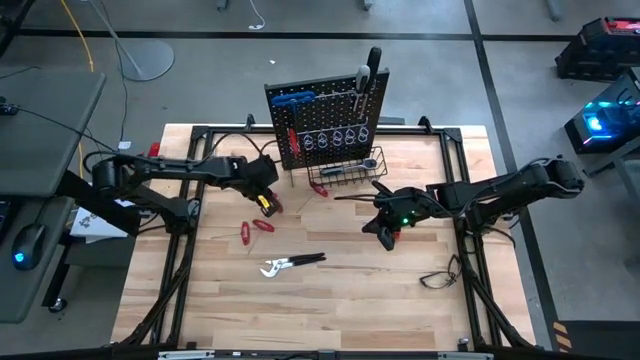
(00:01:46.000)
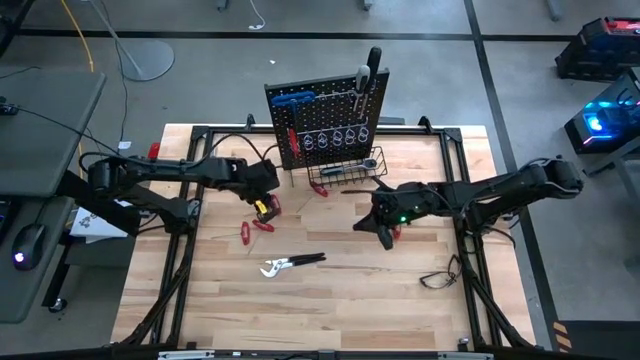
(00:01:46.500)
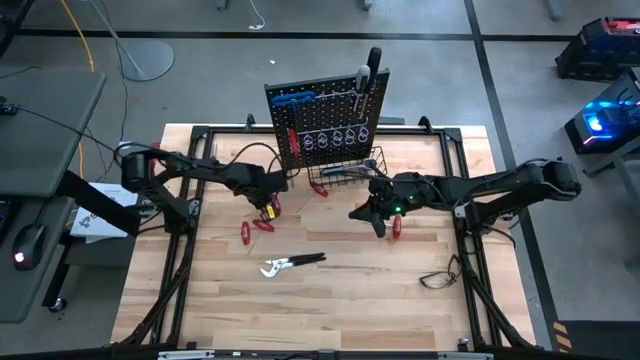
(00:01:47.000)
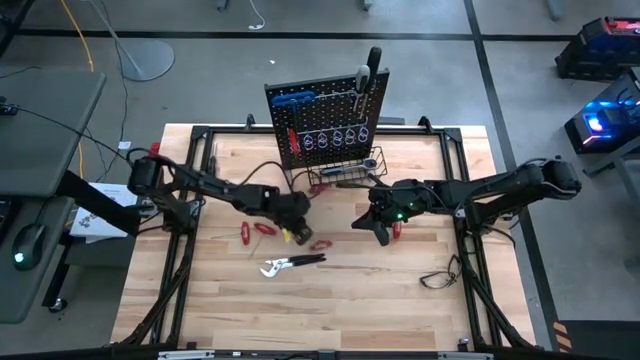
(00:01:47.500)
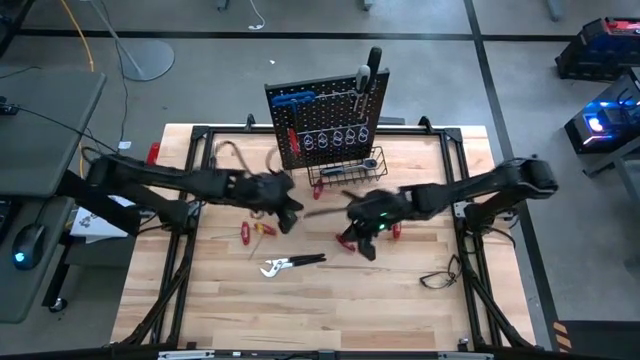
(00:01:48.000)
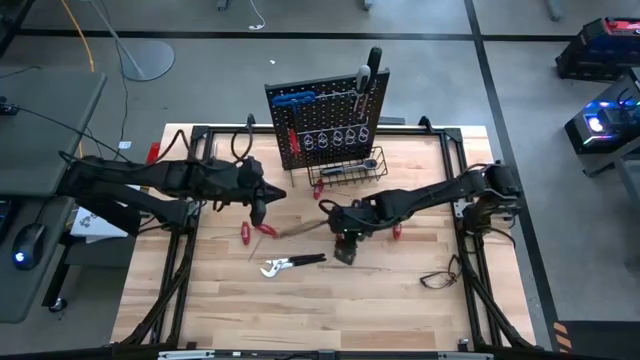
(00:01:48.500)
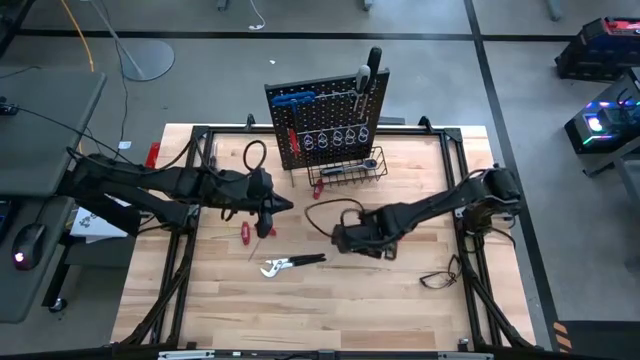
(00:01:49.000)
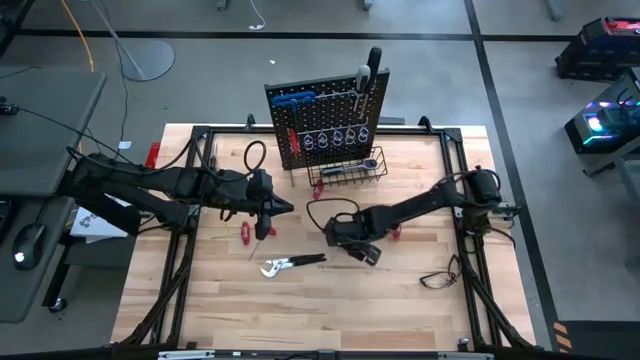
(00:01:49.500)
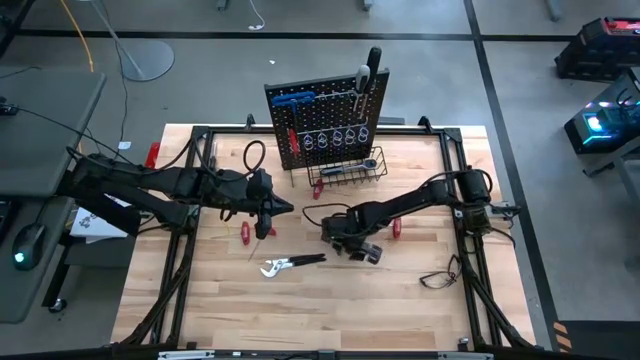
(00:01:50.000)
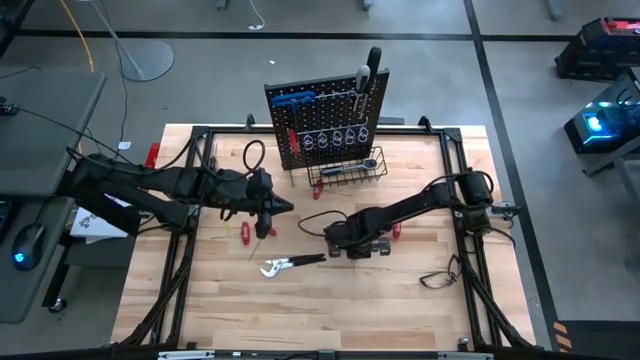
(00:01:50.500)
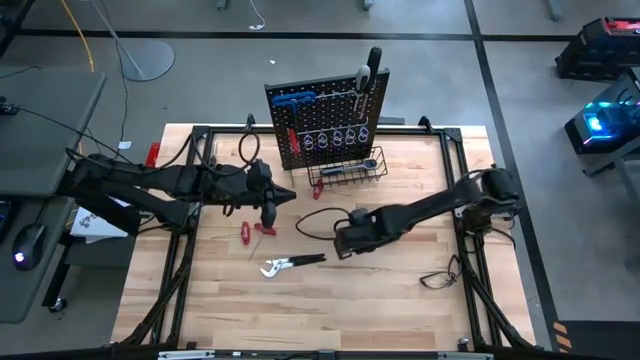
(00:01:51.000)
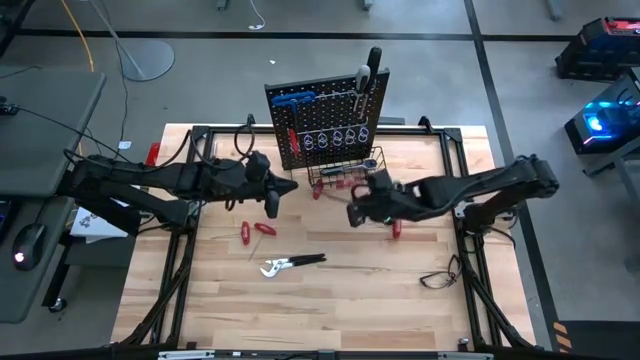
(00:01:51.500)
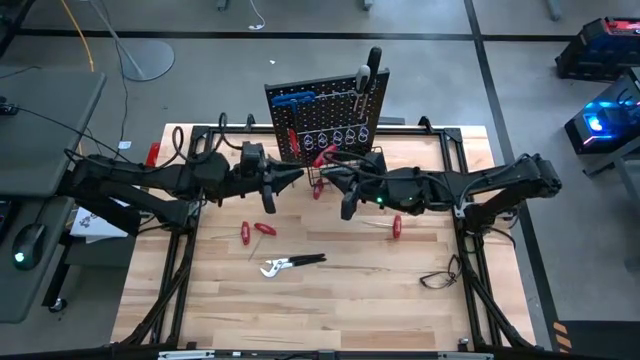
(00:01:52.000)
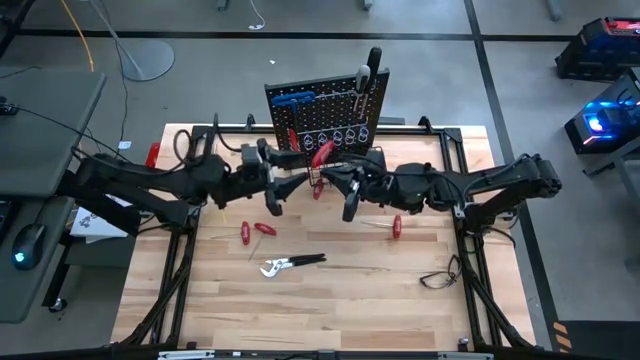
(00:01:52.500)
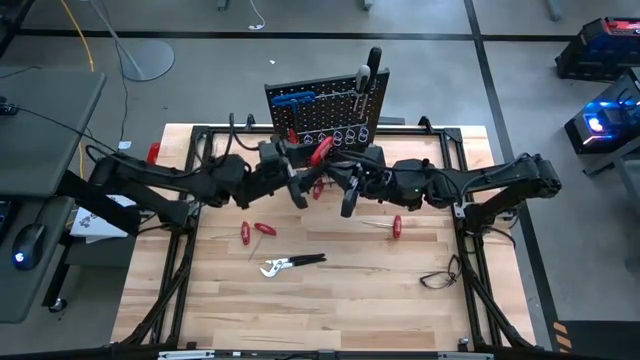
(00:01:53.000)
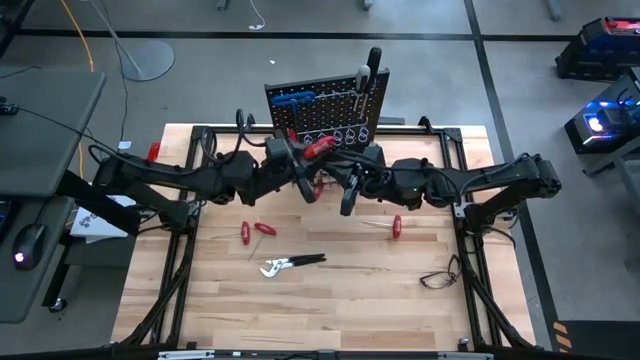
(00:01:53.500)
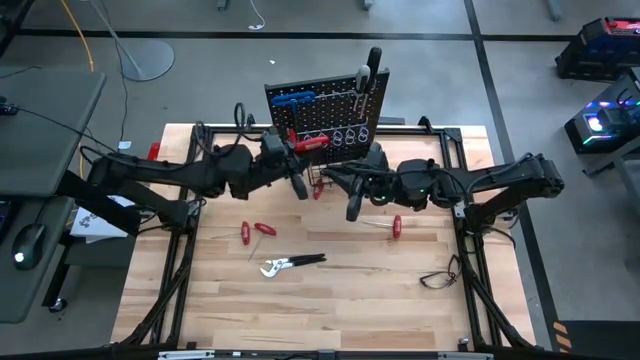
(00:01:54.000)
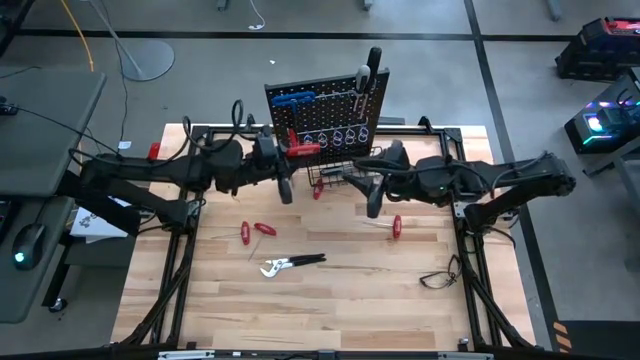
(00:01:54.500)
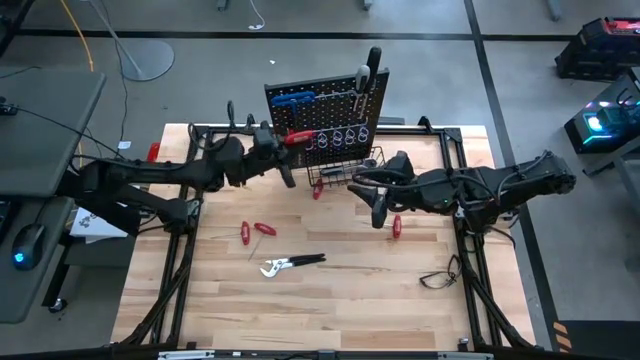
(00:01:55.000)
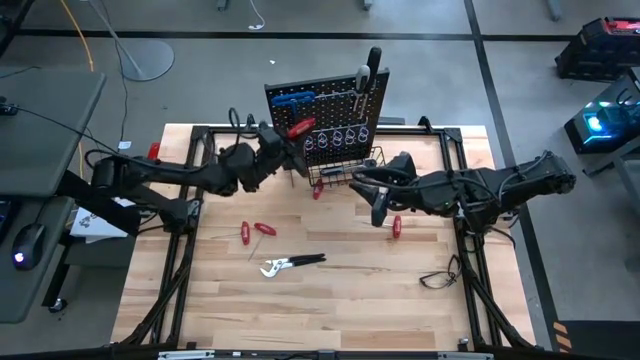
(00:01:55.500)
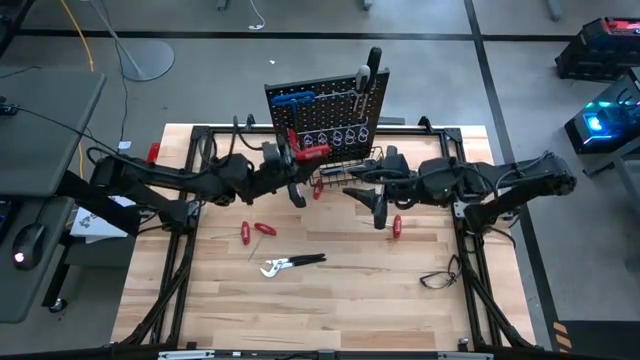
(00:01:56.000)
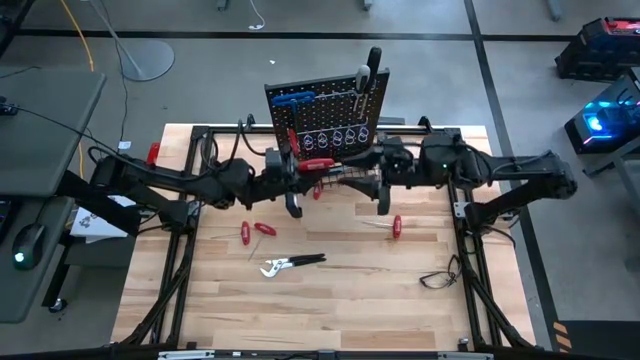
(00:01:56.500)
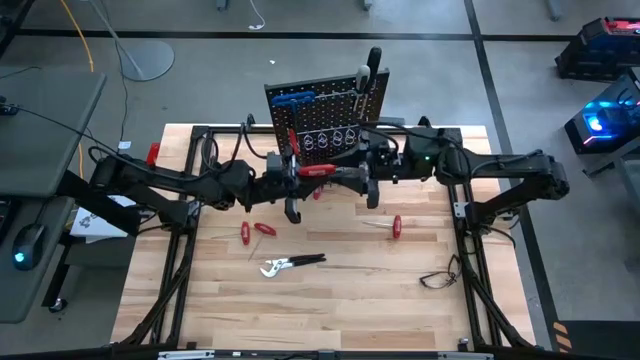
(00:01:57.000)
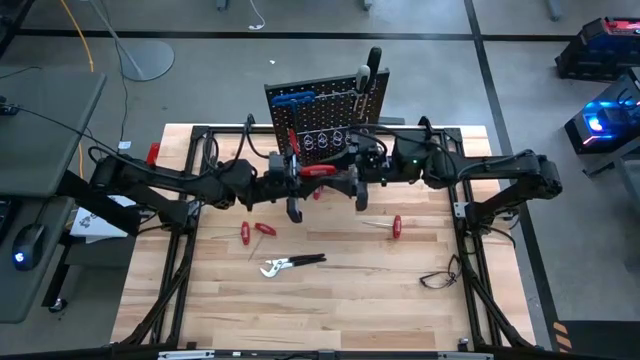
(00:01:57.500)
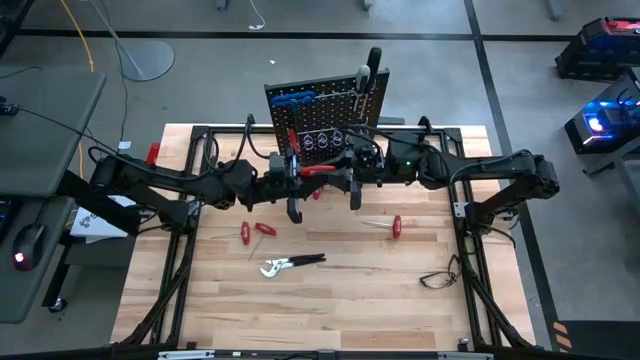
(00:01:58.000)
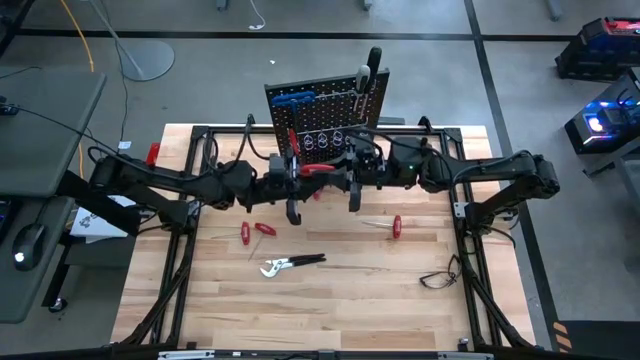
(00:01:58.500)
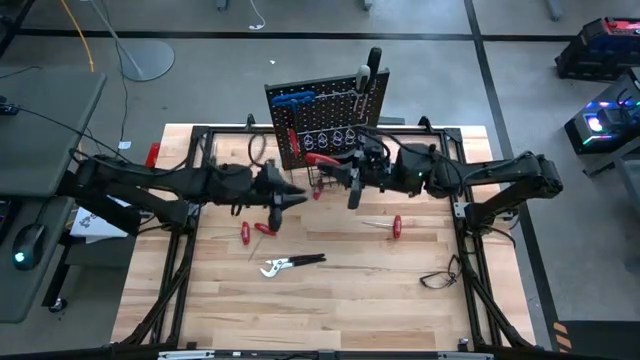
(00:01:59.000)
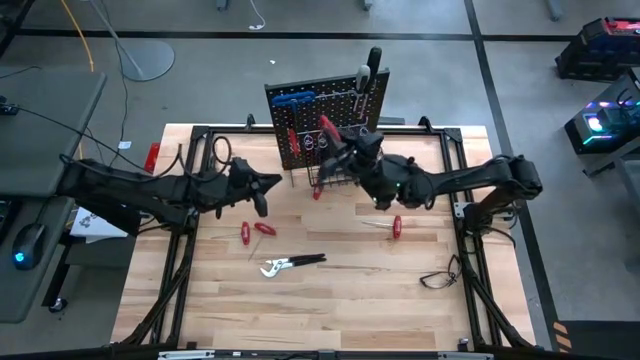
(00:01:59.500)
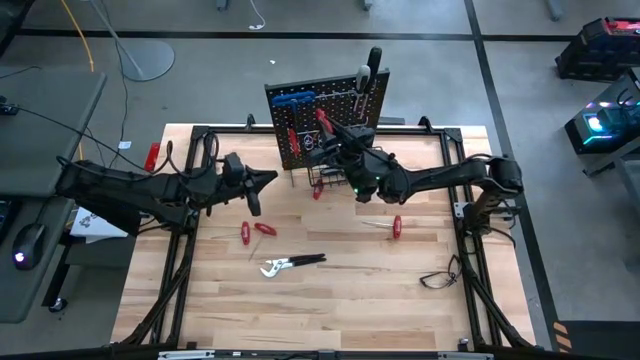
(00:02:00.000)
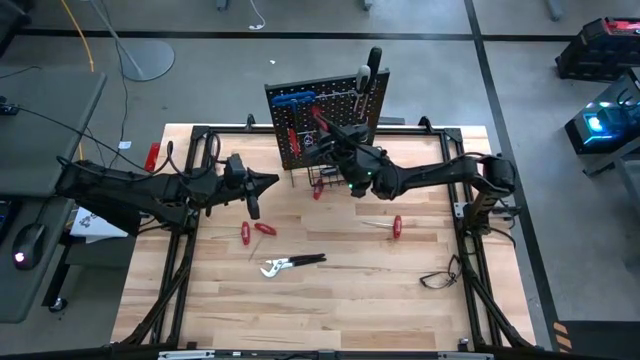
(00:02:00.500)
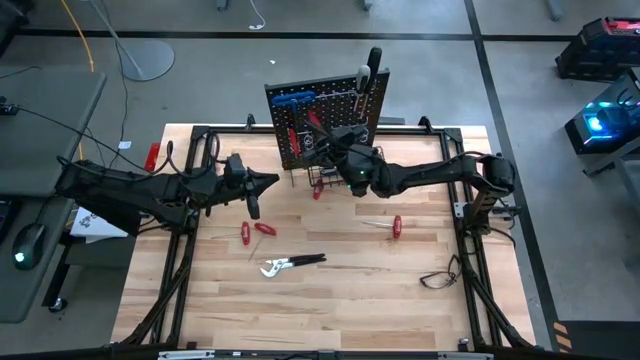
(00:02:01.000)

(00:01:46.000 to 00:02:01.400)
Task: Hang tools onto peg board
Hang the red allen wrench on the peg board

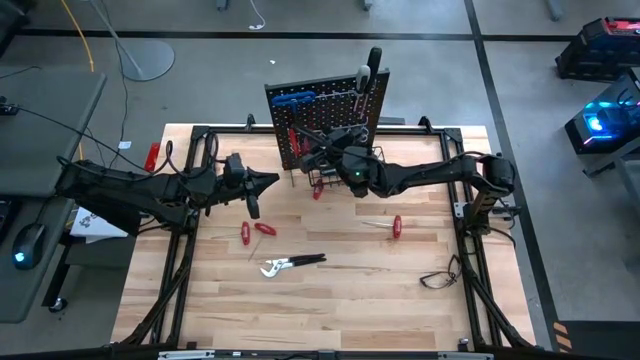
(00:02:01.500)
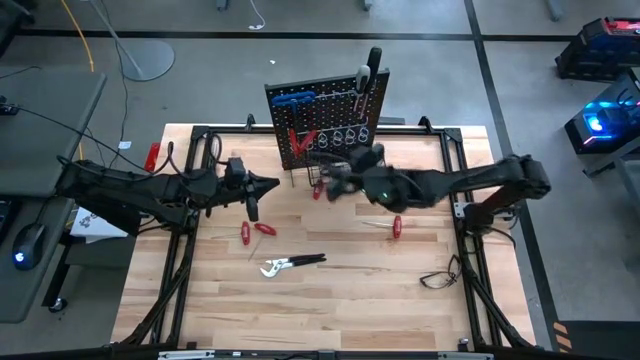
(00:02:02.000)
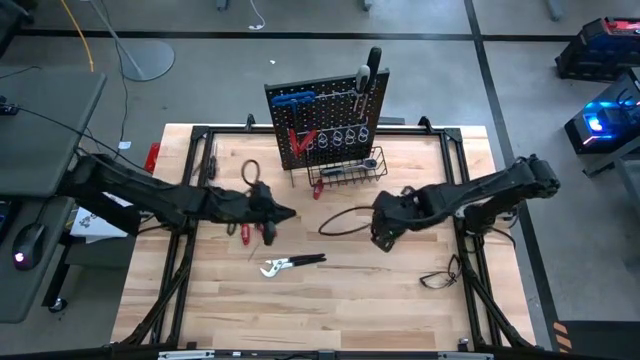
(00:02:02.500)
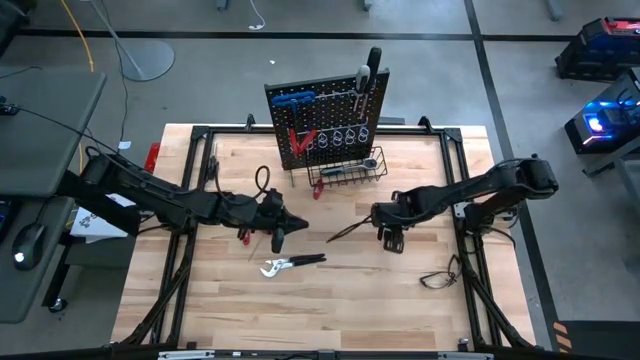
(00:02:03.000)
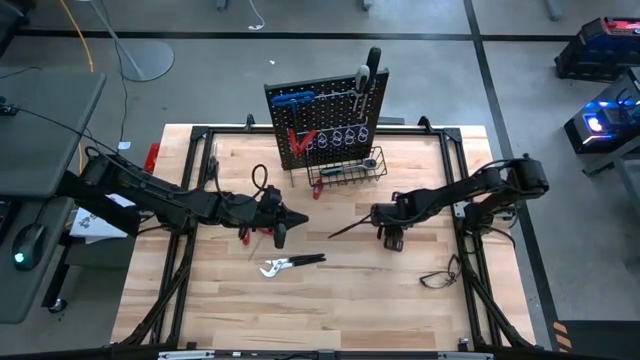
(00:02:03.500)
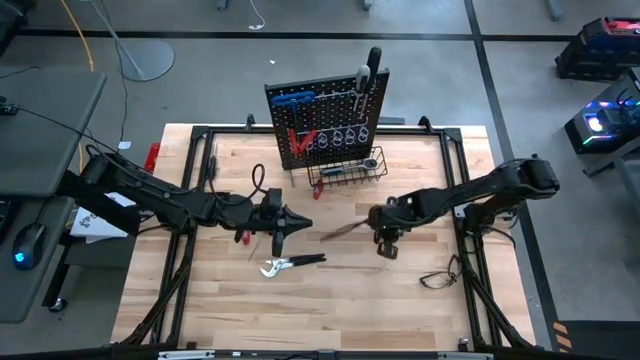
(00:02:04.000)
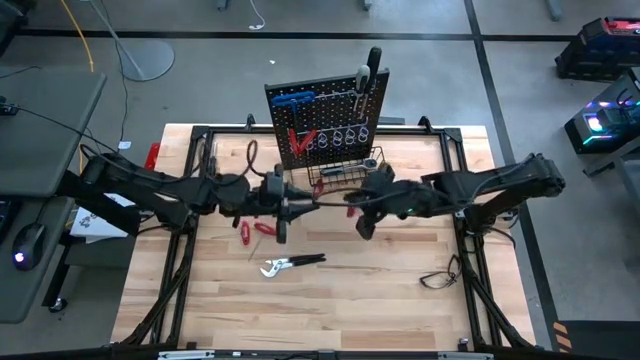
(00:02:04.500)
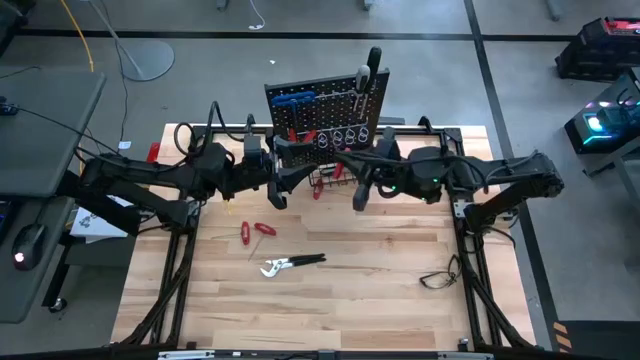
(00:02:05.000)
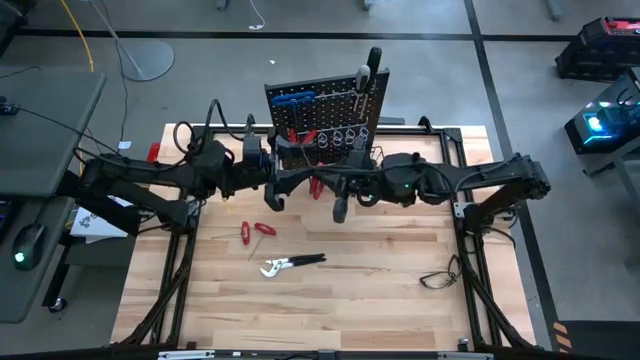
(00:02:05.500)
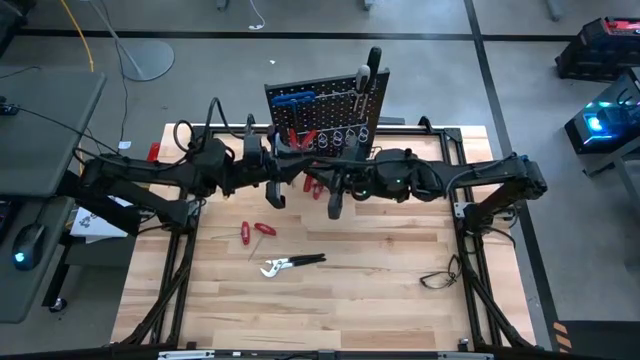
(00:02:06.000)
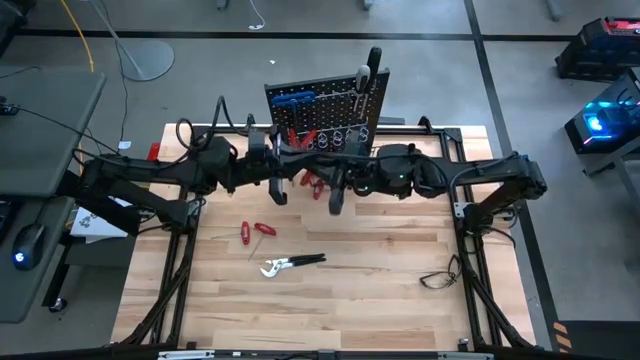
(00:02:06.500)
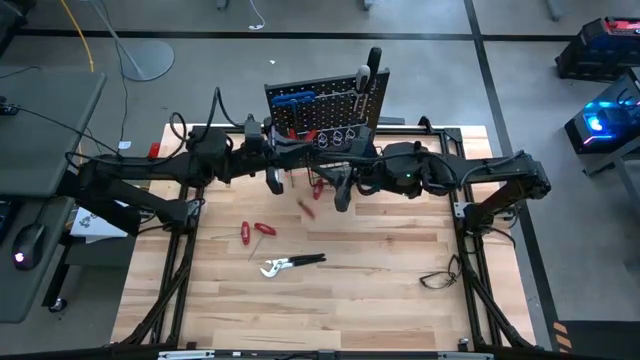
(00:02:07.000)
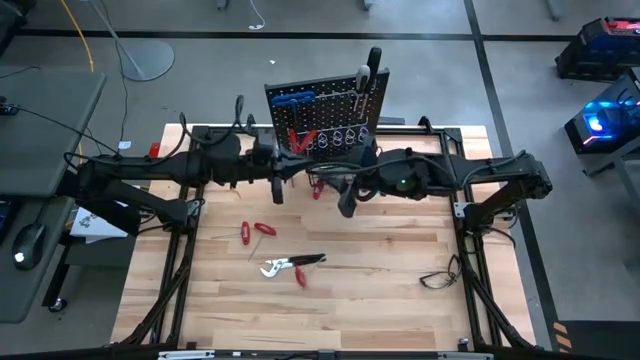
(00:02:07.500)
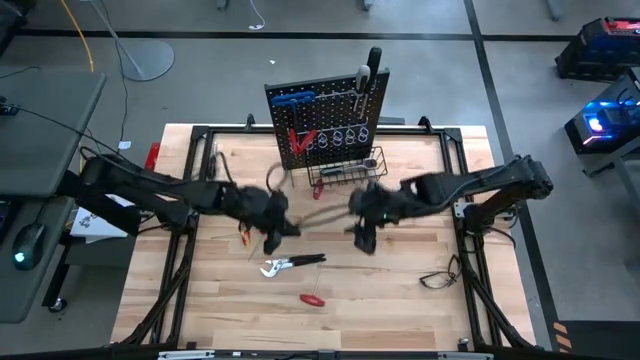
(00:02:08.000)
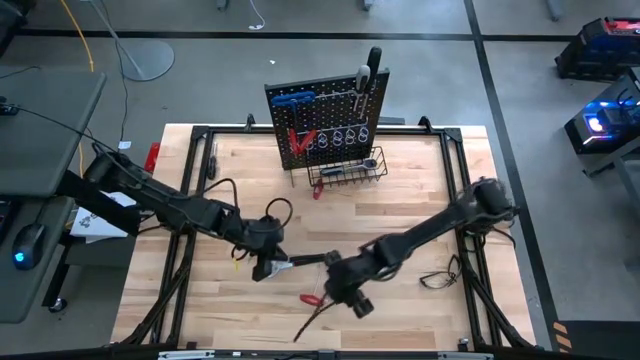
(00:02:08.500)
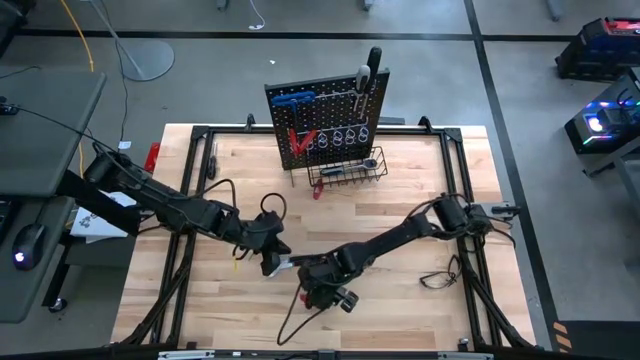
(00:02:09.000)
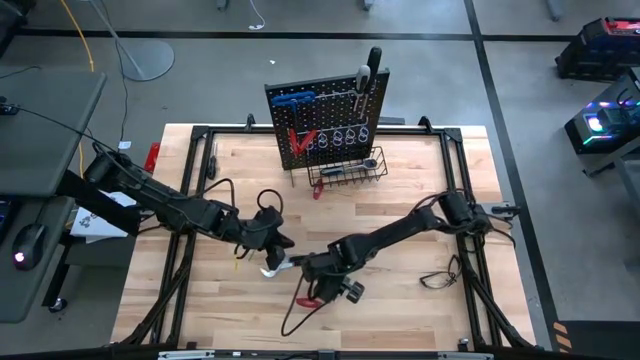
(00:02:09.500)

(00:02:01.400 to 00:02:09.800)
Hang the red allen wrench on the peg board
